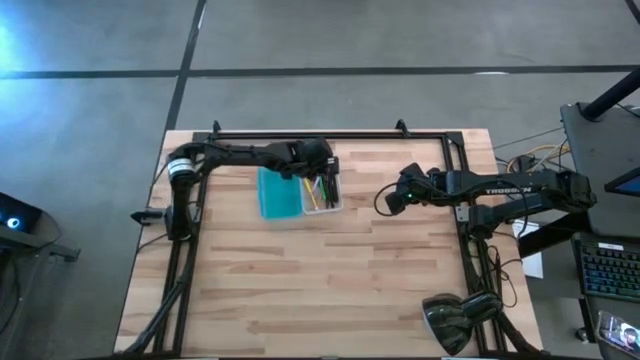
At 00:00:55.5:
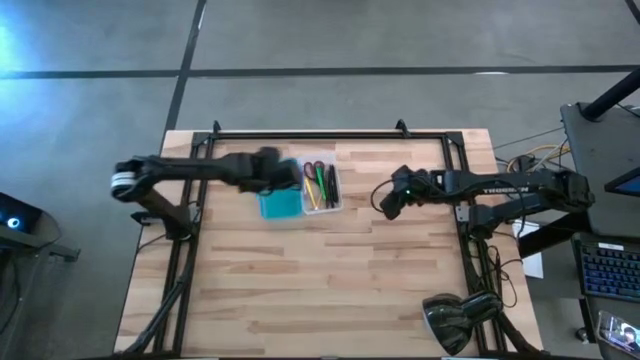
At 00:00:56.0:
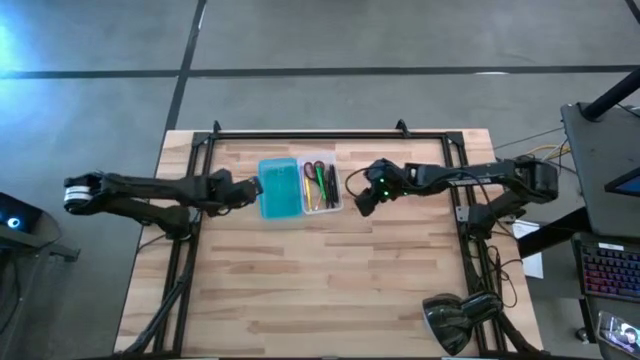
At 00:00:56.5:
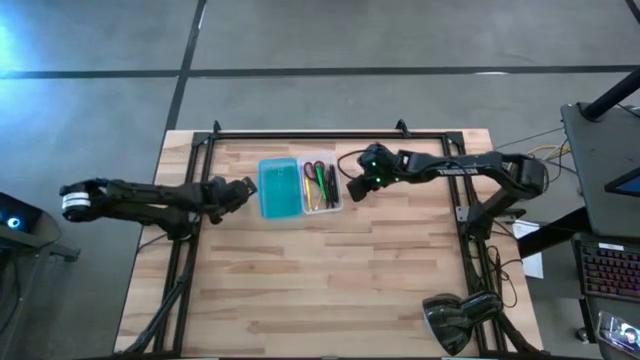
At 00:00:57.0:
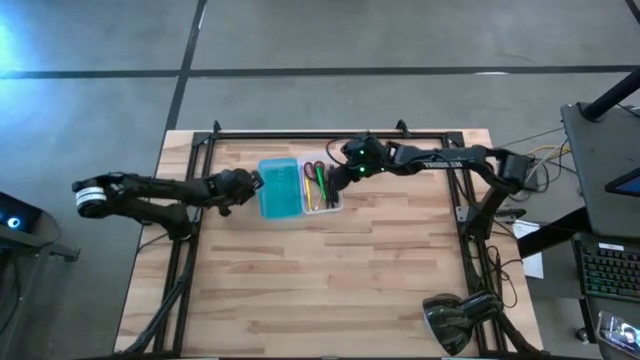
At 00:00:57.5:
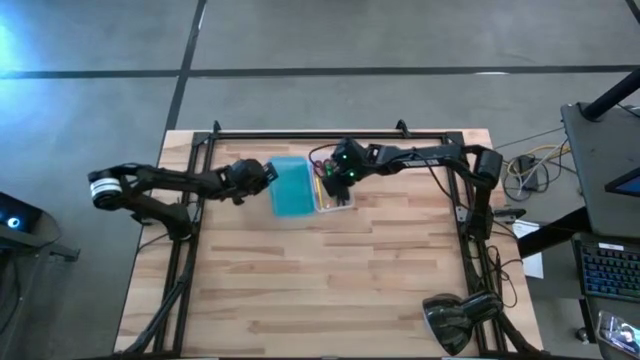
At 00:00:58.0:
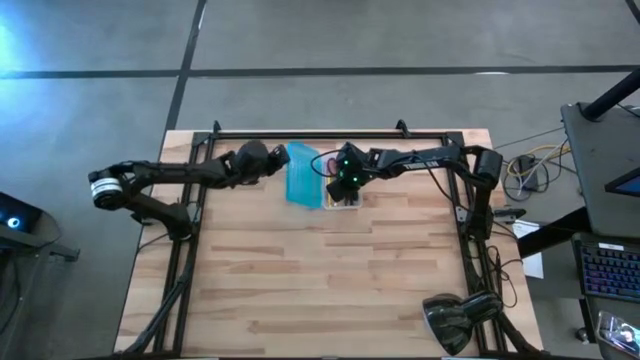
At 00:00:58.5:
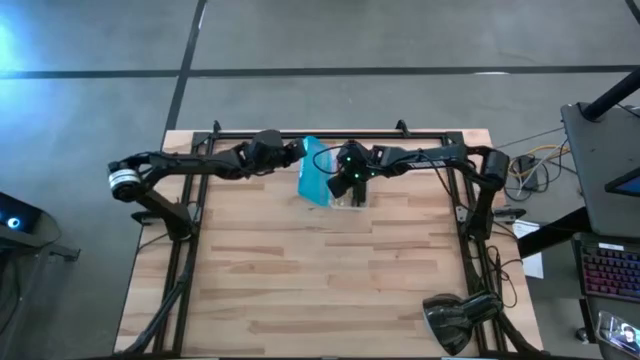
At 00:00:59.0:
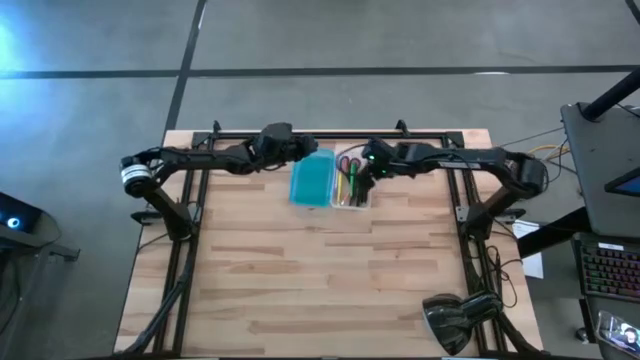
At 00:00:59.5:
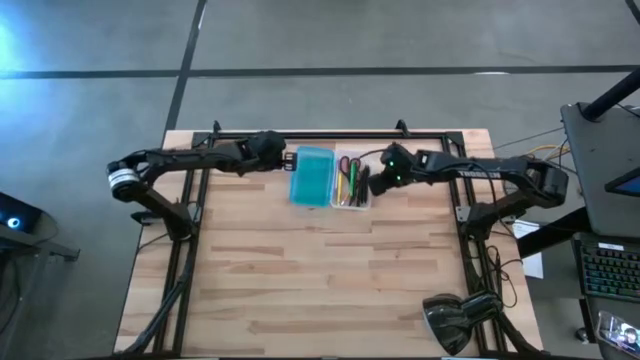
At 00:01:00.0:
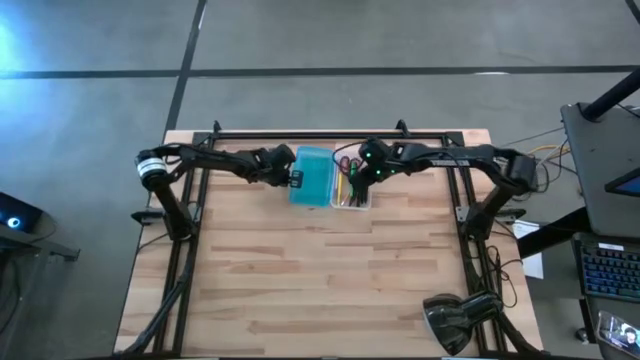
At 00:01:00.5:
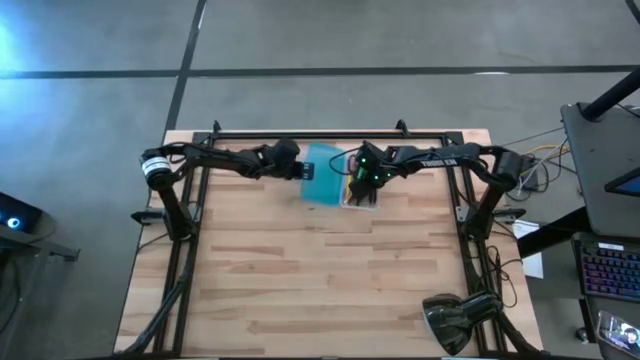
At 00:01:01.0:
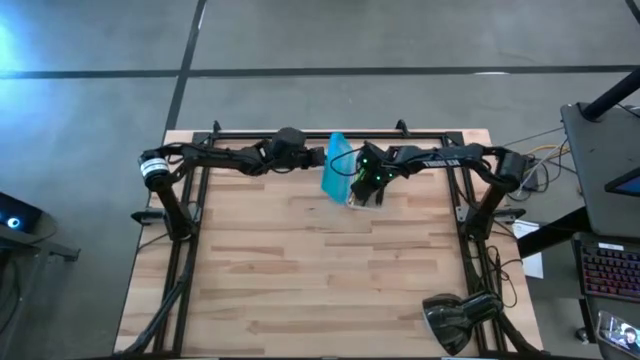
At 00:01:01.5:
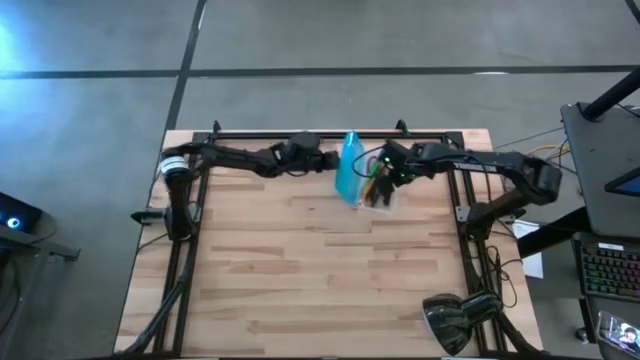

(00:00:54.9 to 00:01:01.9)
Task: Pick & place school supplies into a supply box
Close the pencil box

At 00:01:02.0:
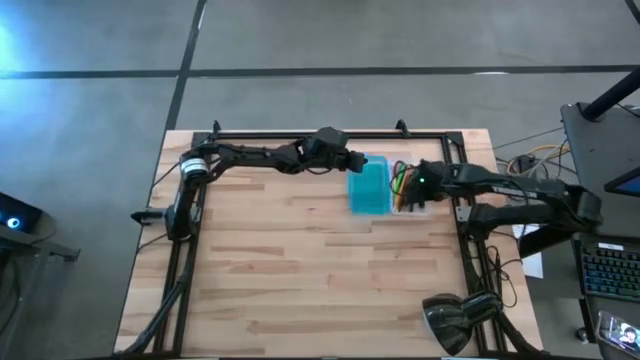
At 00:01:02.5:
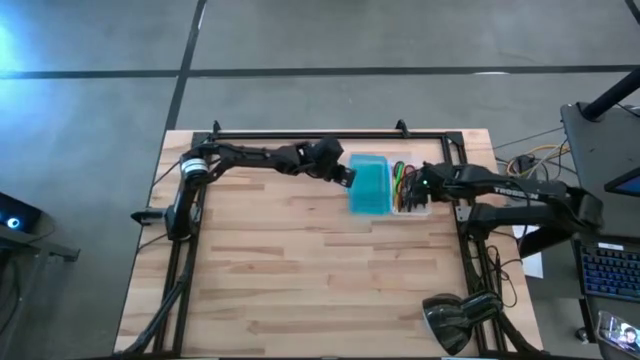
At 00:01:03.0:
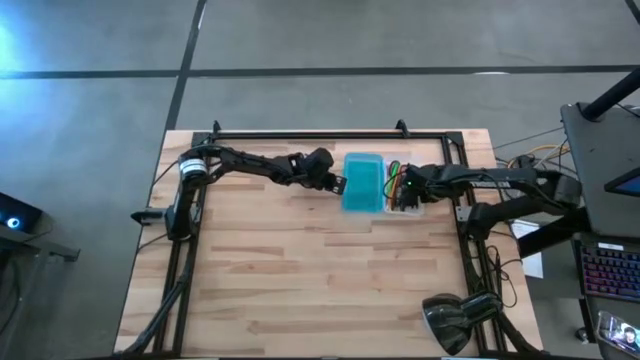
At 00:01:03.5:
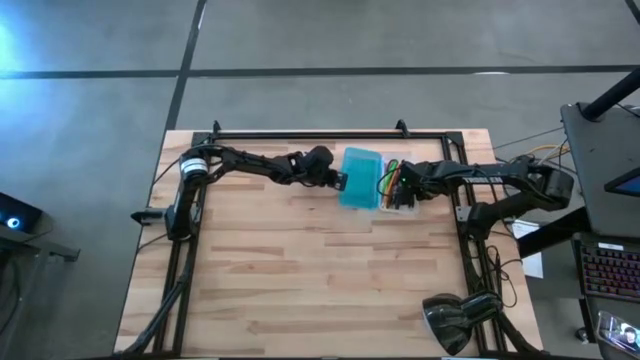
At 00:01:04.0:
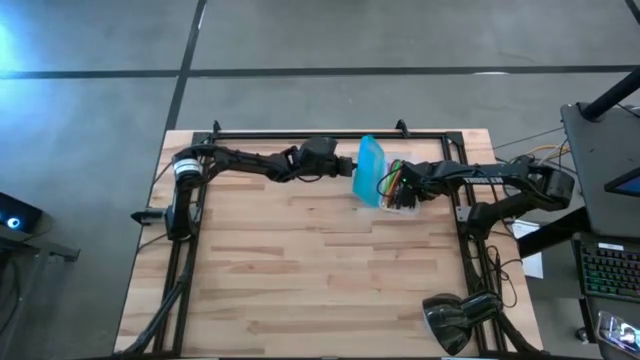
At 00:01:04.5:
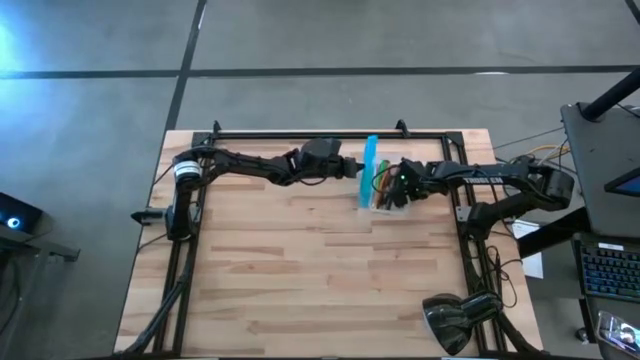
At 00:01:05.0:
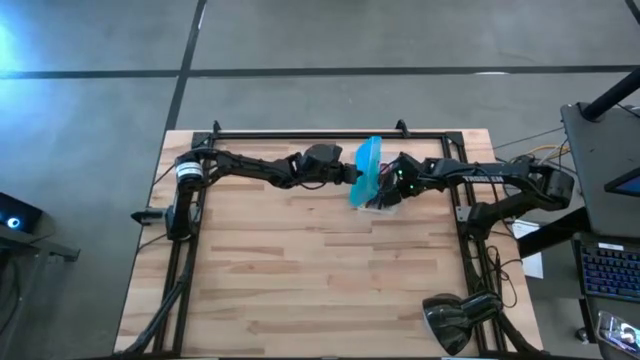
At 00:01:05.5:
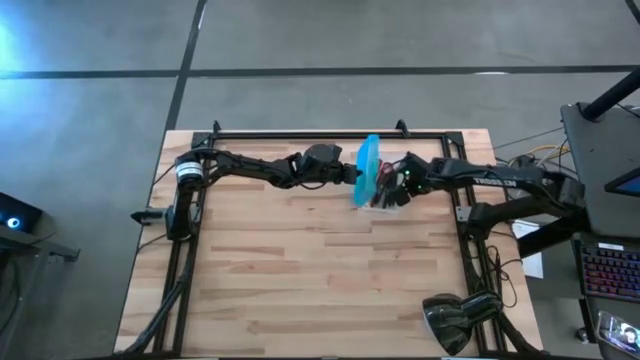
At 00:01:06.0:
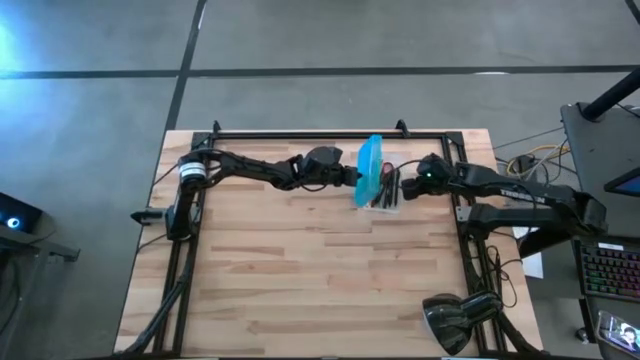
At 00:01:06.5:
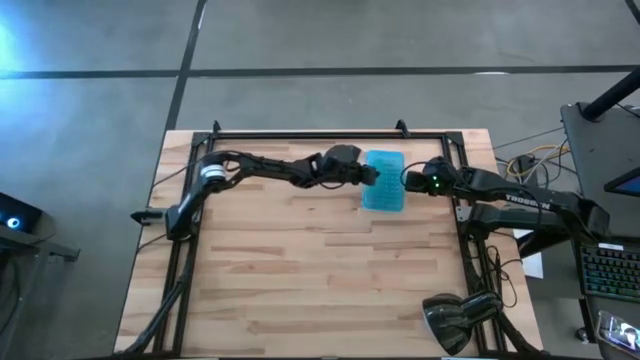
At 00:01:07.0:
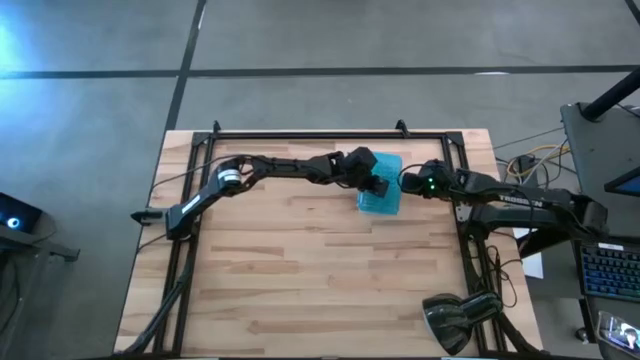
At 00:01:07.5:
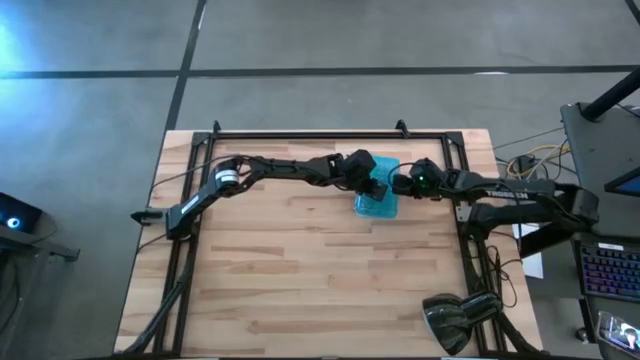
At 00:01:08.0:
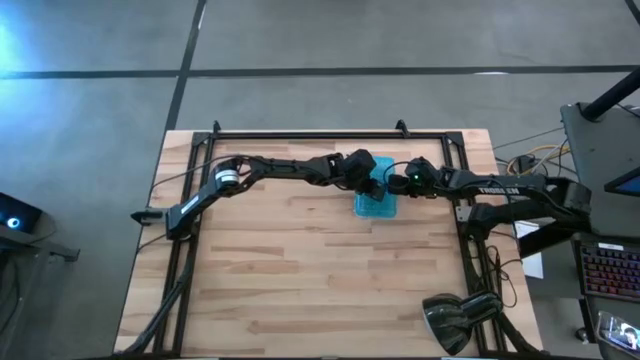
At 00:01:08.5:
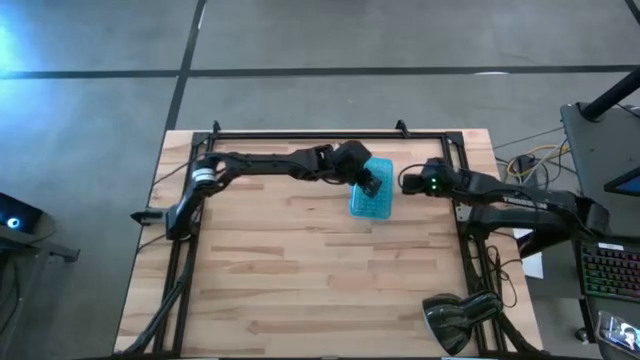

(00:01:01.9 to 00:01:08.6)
Close the pencil box

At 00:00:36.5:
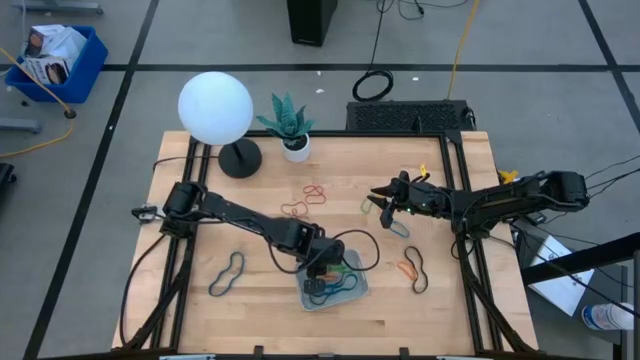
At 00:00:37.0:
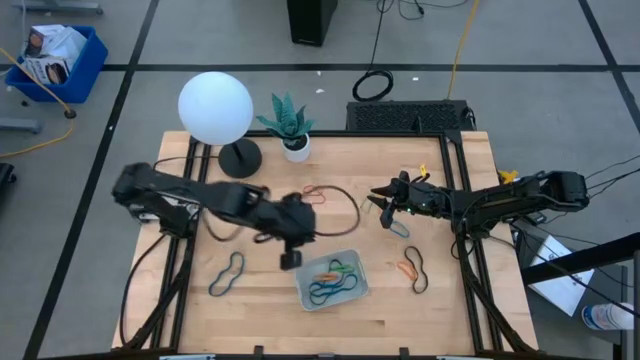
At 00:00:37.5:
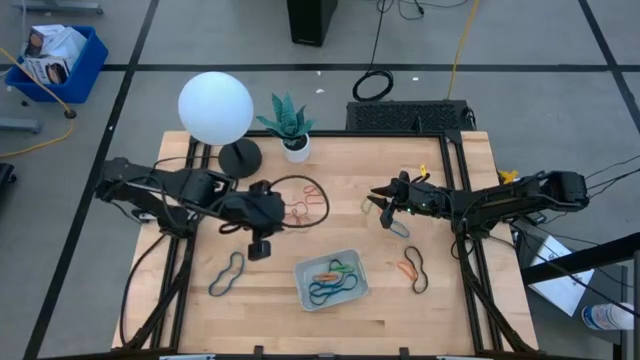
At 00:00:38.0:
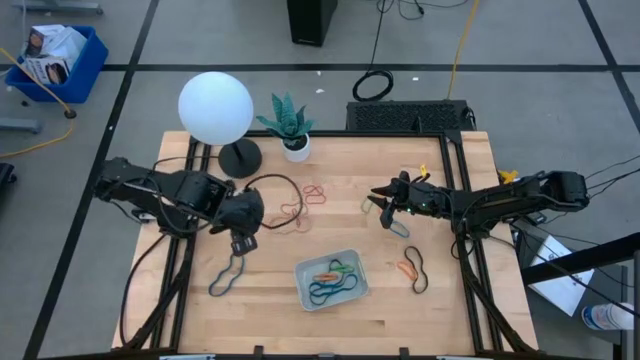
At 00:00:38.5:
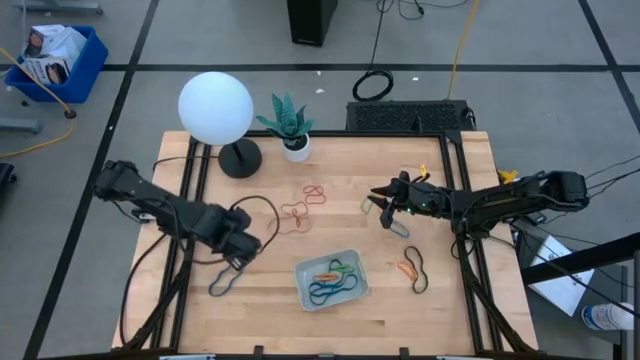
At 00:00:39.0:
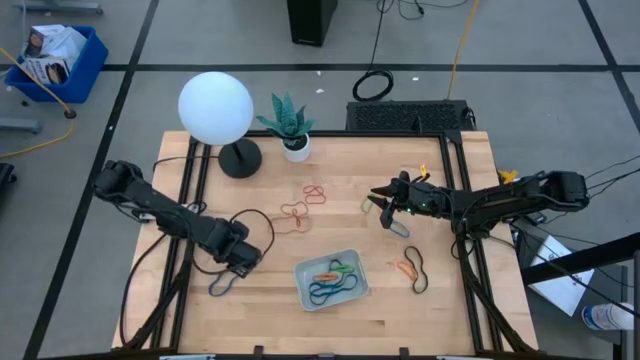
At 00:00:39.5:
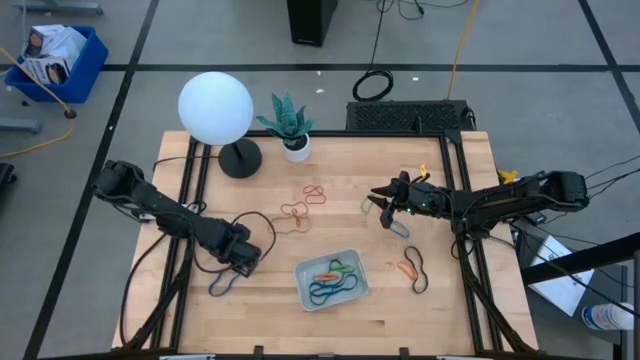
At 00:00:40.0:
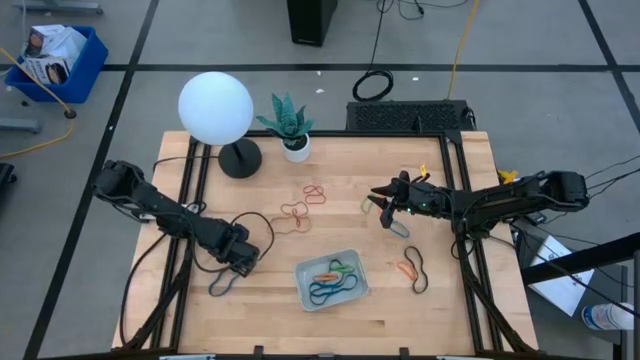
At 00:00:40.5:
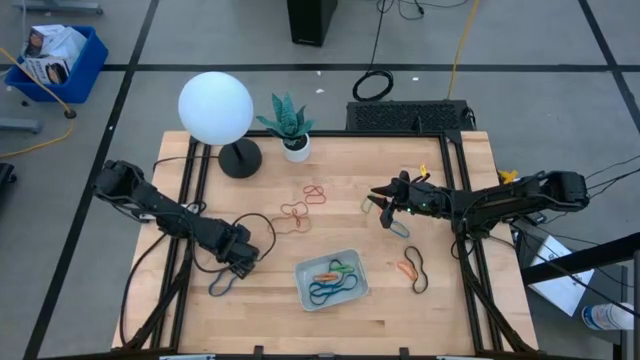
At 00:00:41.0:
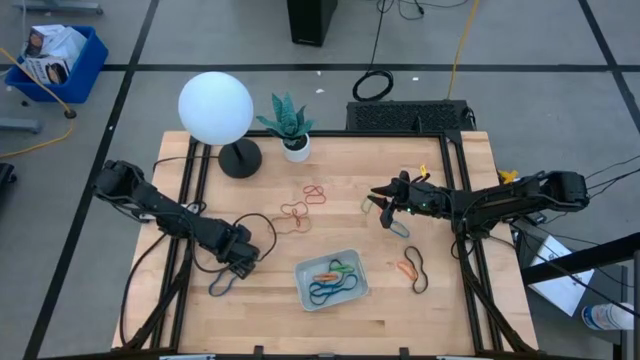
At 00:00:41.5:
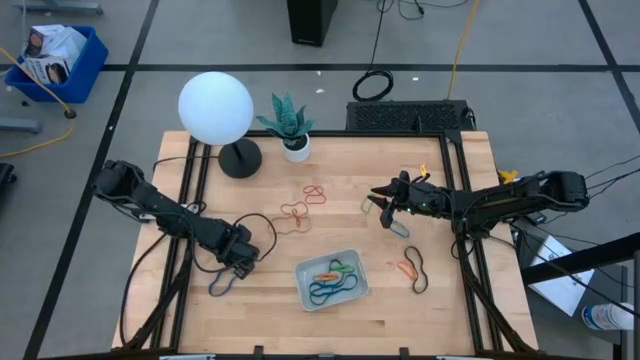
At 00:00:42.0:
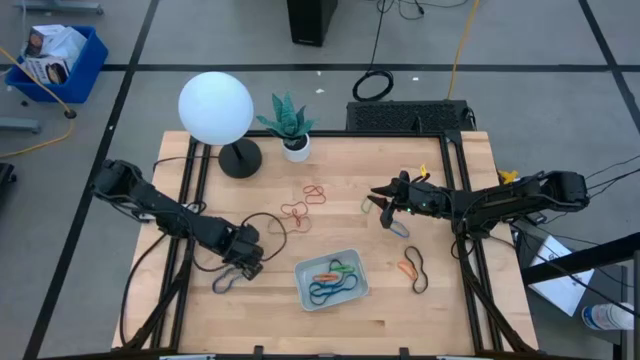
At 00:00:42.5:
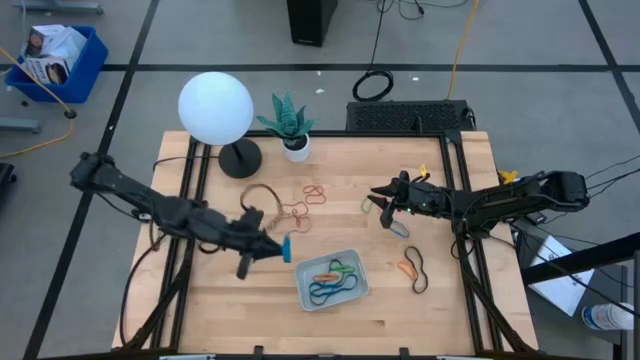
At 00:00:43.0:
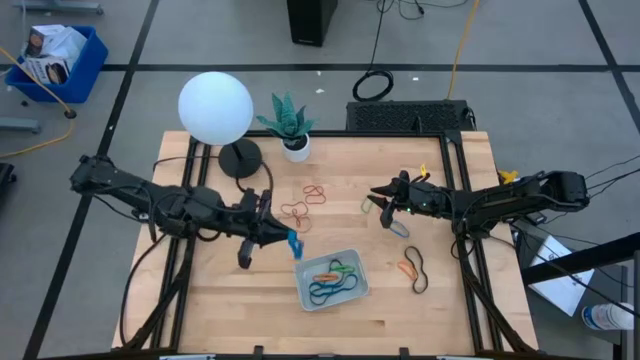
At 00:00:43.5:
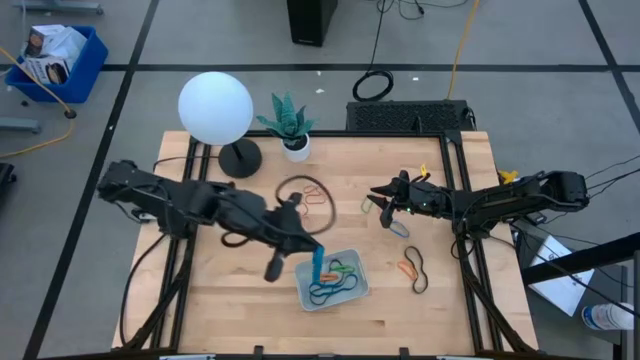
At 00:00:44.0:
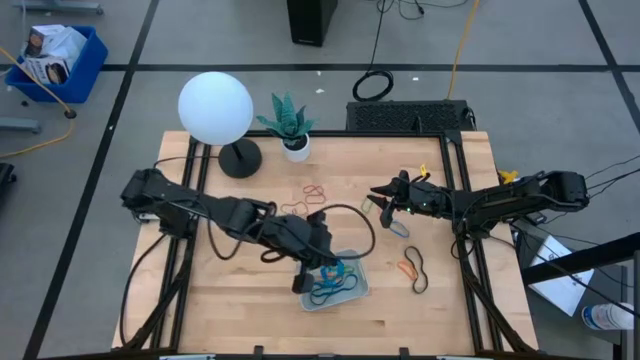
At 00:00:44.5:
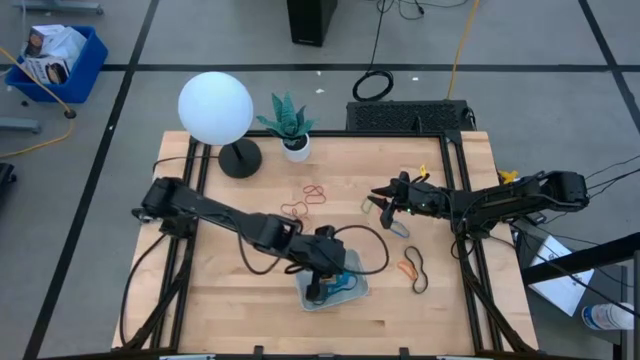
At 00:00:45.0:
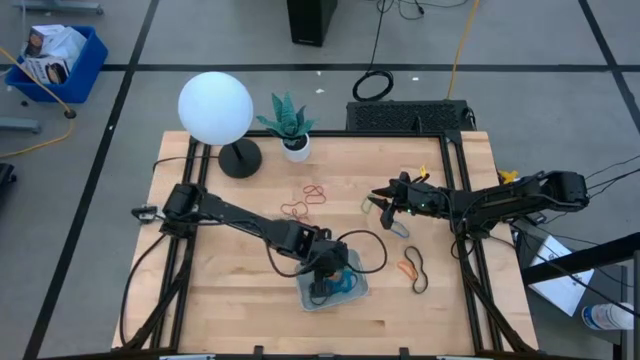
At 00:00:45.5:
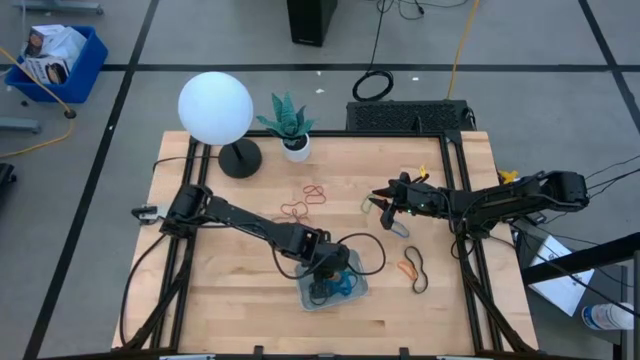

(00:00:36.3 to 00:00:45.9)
Task: Pick and place rubber bands into bin
Put the left blue rubber band into the gray bin
